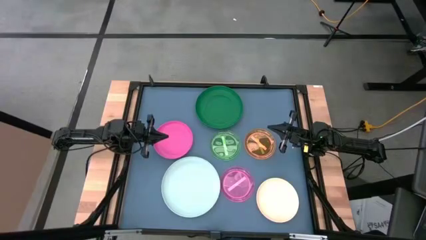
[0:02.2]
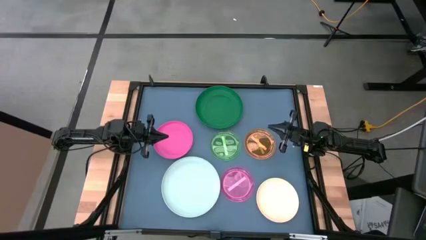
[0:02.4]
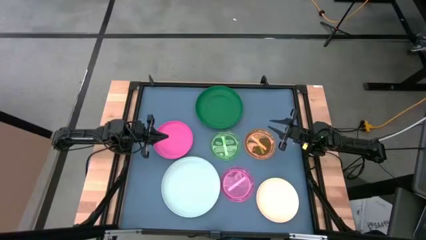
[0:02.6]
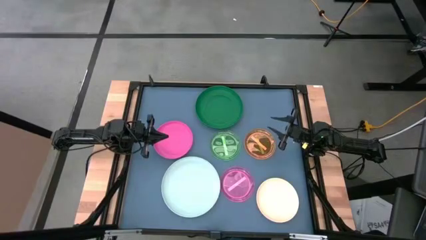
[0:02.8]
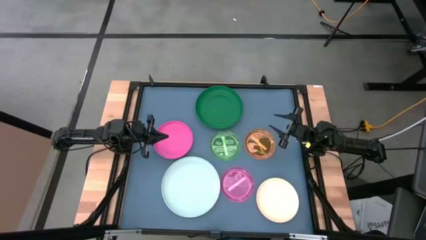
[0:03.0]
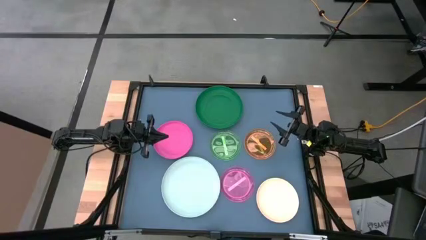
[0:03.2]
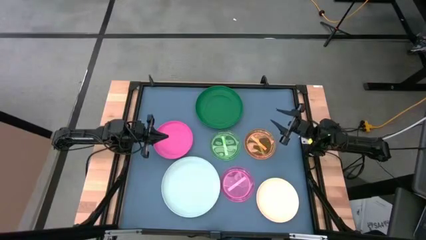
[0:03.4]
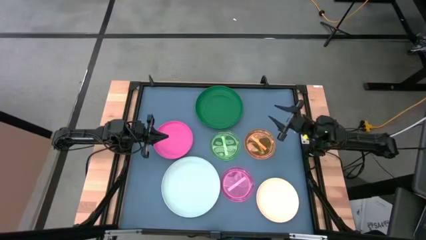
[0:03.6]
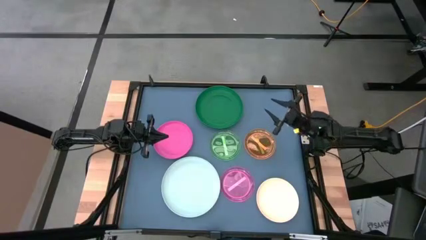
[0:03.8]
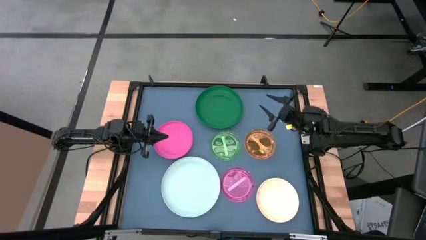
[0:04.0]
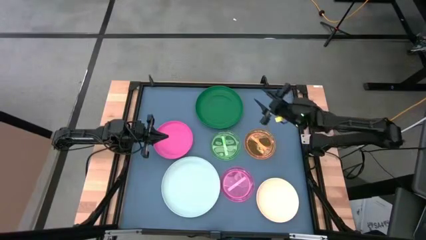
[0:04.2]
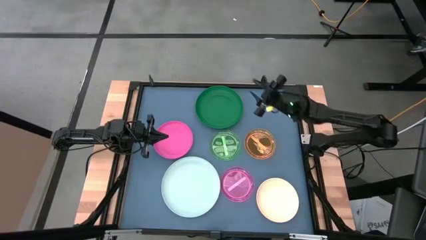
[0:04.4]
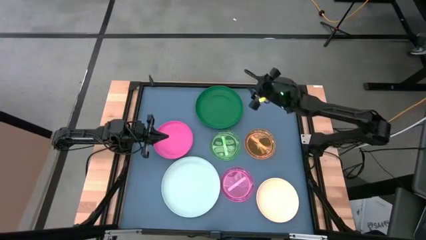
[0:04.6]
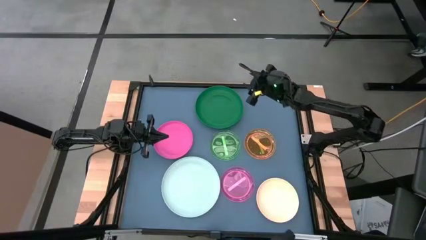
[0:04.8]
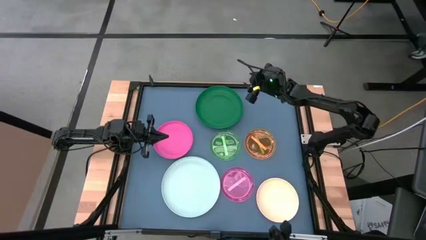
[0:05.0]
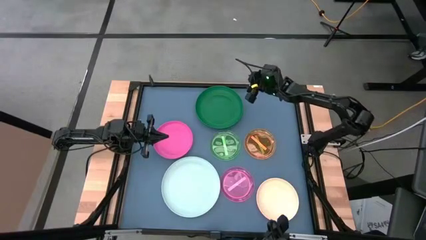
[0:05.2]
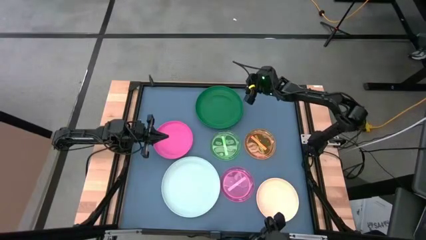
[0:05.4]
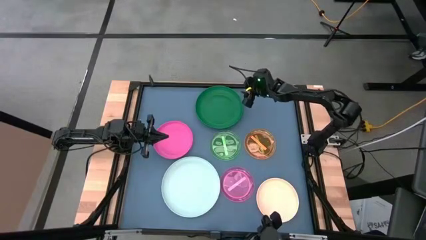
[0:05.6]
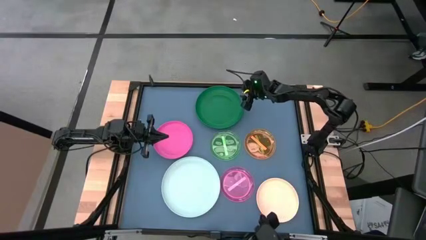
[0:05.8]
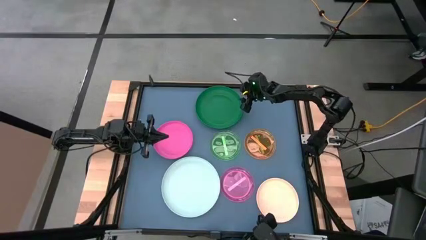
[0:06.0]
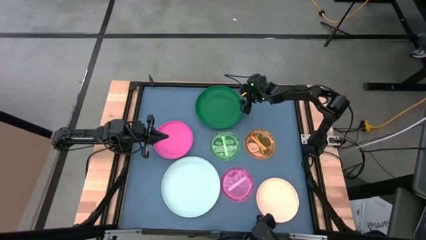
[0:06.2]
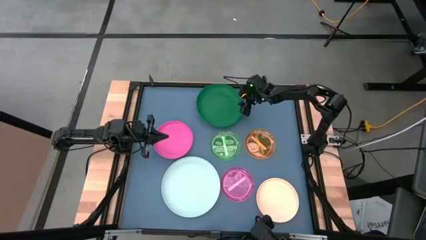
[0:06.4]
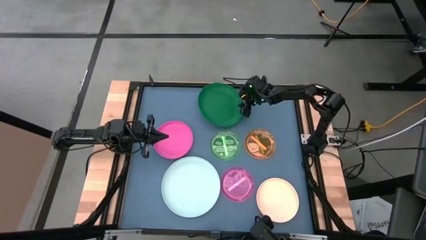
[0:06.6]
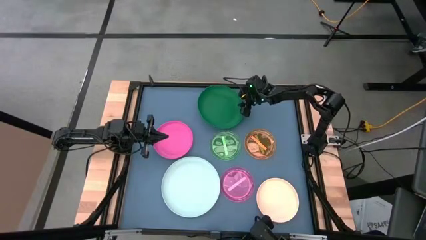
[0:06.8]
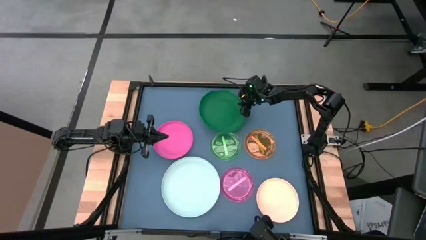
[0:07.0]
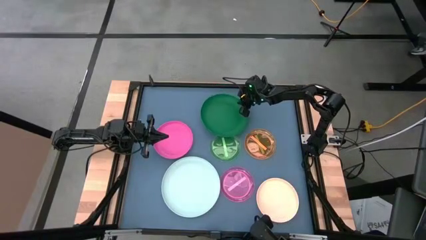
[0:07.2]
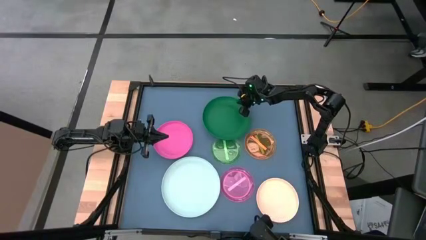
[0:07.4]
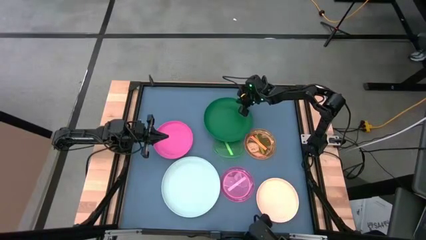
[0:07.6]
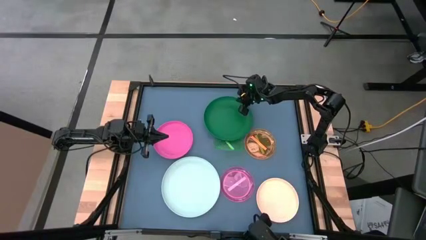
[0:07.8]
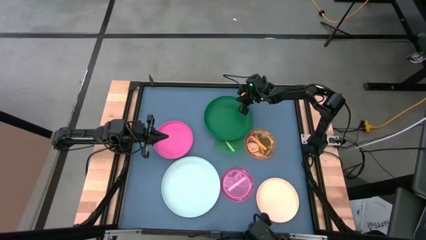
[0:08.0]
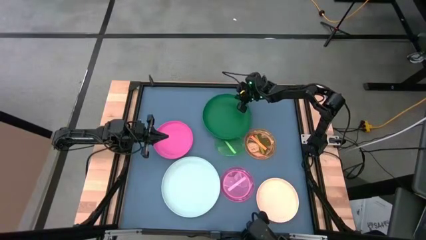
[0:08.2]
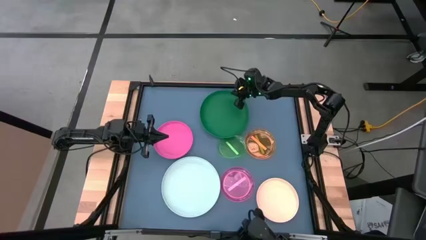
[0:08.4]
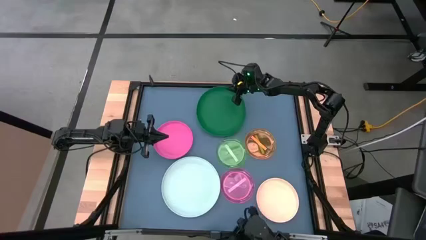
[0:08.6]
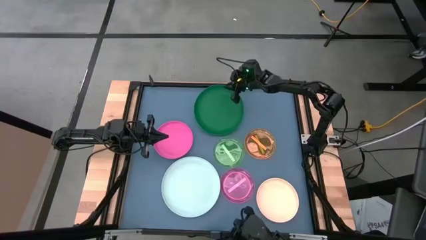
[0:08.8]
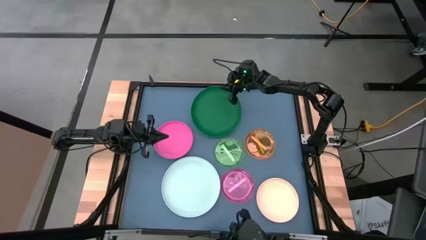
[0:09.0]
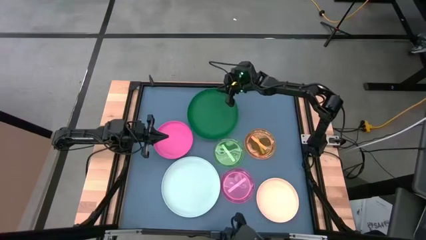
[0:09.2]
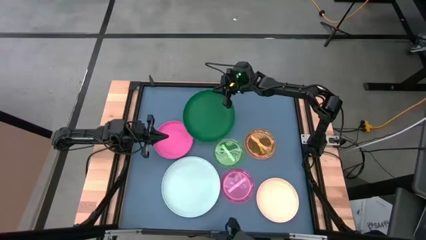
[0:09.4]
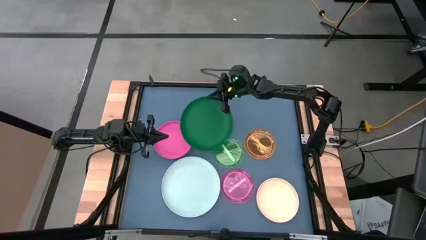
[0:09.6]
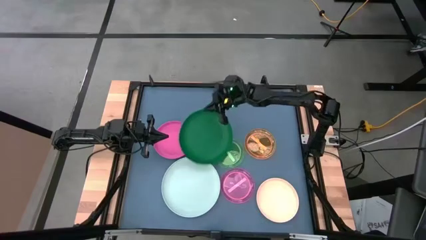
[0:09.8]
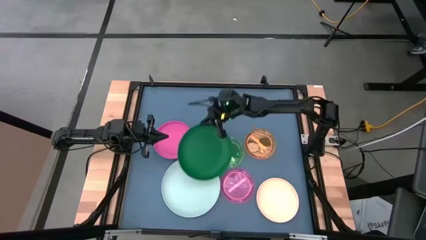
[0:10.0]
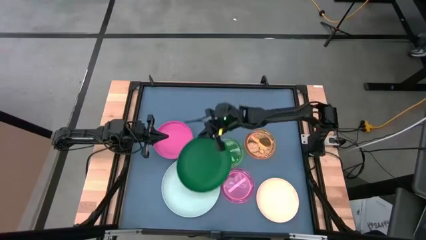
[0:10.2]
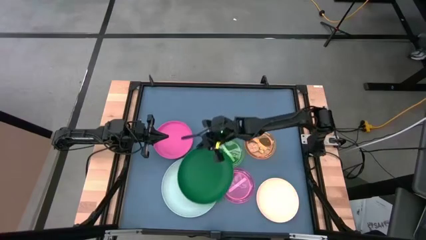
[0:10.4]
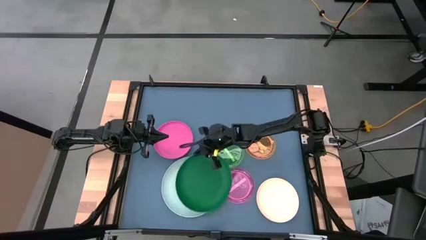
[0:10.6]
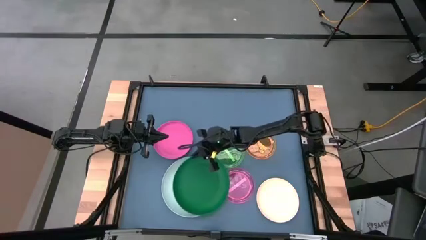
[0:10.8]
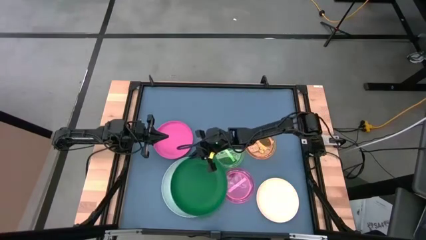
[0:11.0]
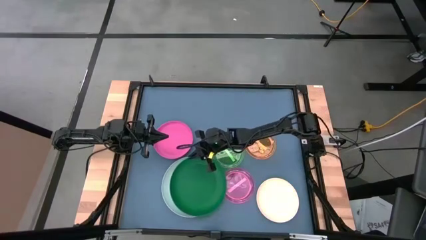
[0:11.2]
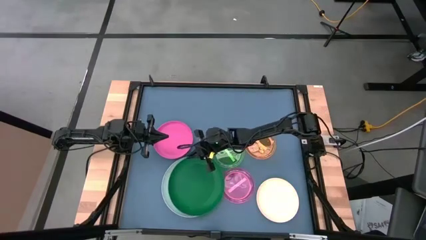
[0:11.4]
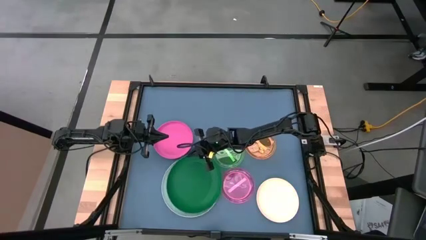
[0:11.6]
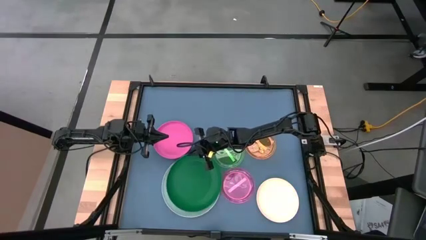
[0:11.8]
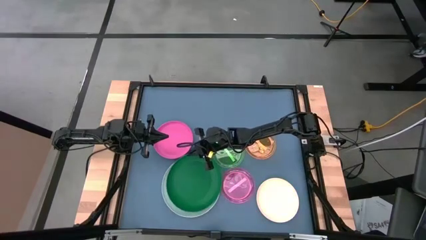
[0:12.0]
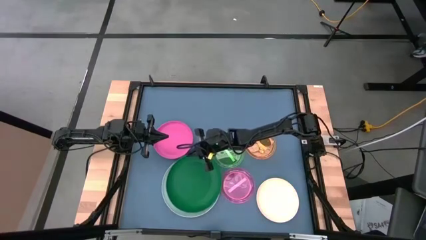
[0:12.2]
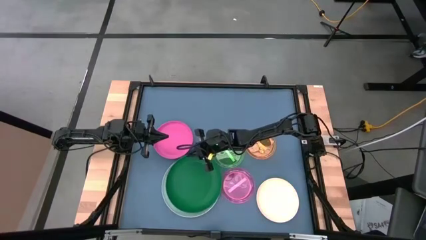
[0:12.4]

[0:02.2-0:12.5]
Task: Stack plastic plates
Stack the green plate on top of the white plate
